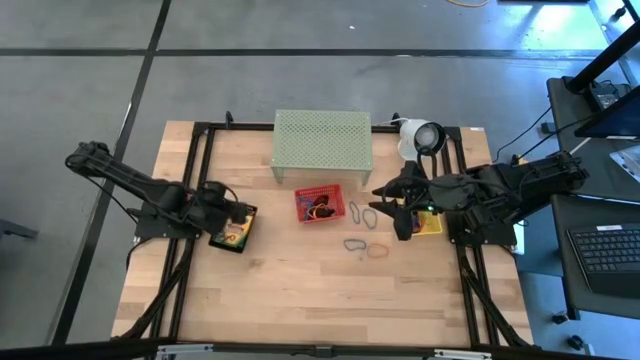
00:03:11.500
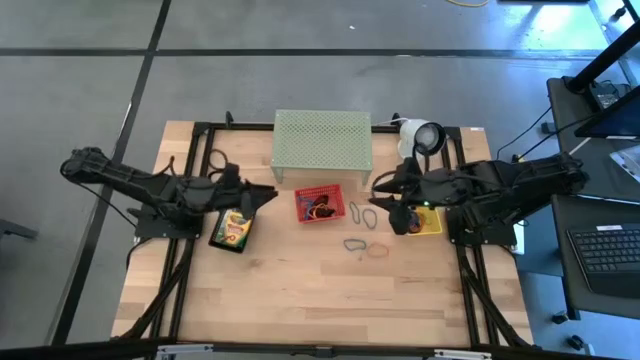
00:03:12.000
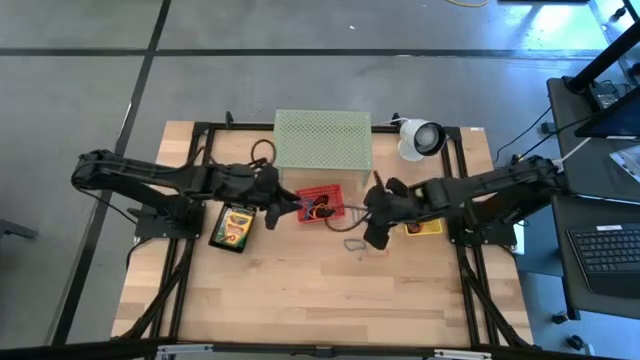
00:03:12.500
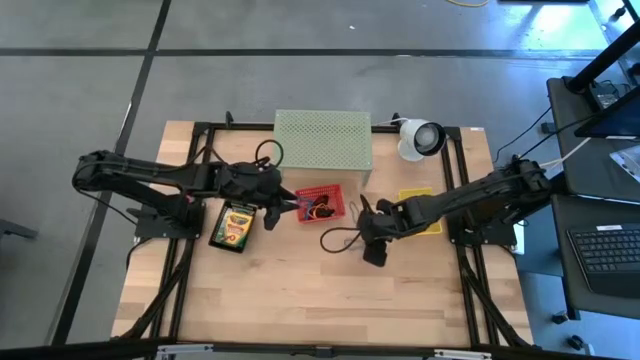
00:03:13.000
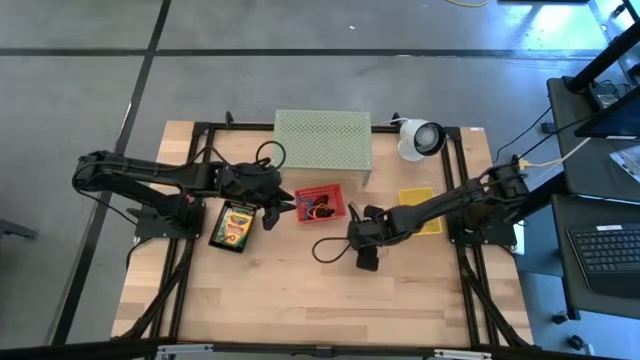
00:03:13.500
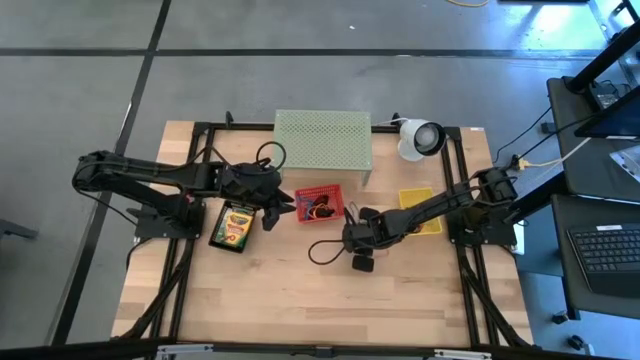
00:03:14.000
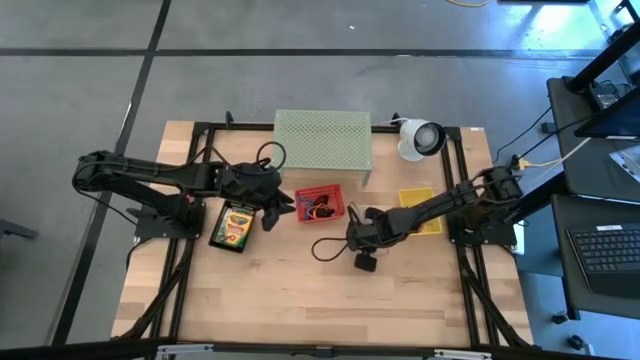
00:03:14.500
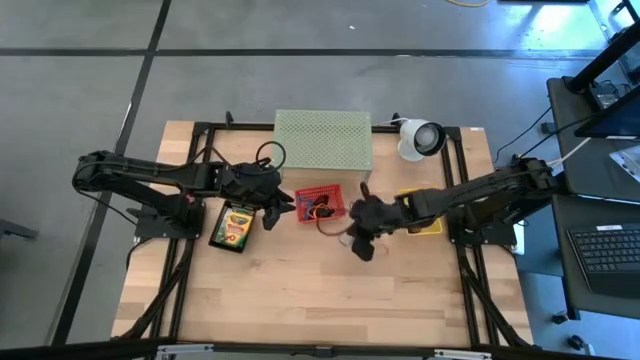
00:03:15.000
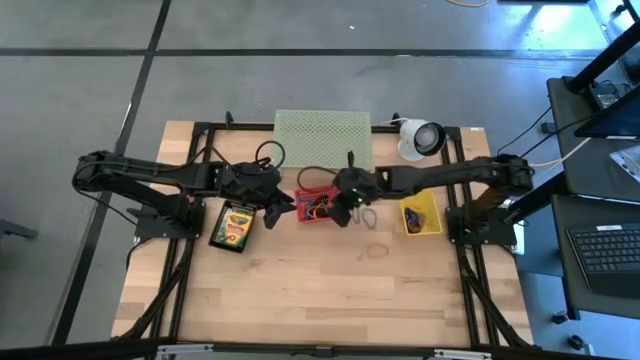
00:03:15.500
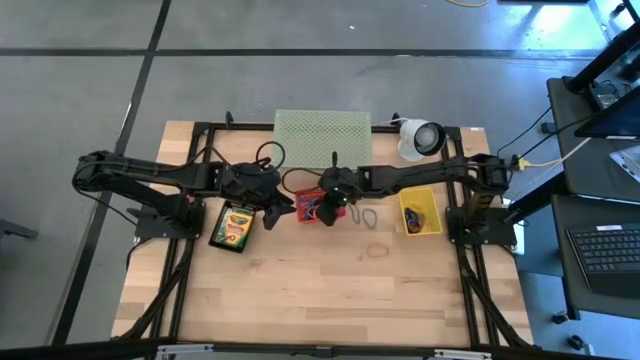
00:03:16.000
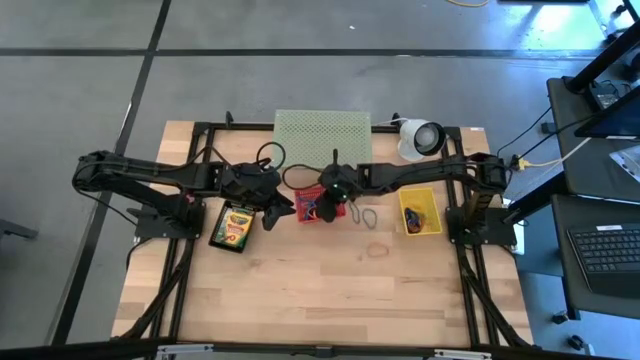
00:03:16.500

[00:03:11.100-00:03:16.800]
Task: Pick & Place Office Desk Supplies
Put the blue rubber band into the red bin

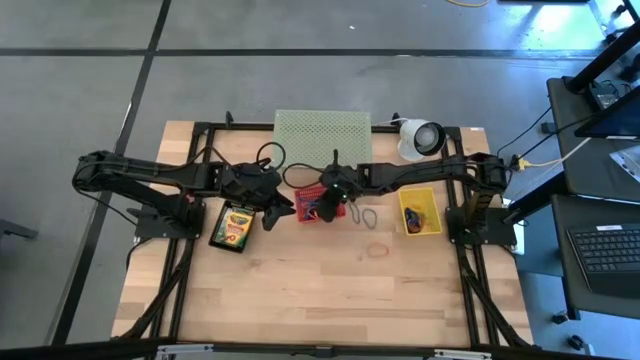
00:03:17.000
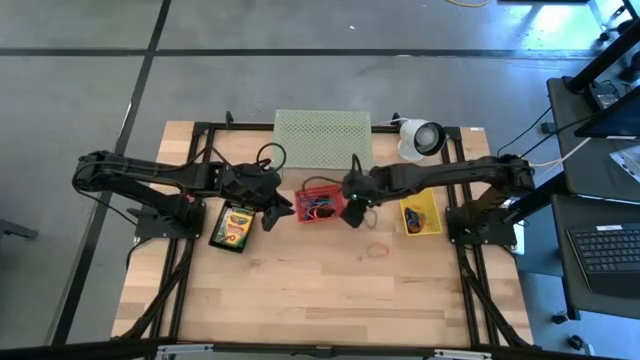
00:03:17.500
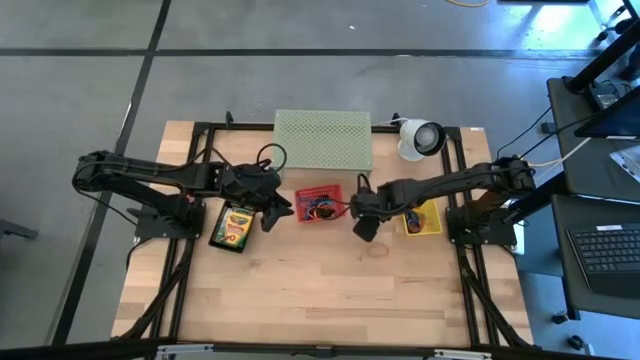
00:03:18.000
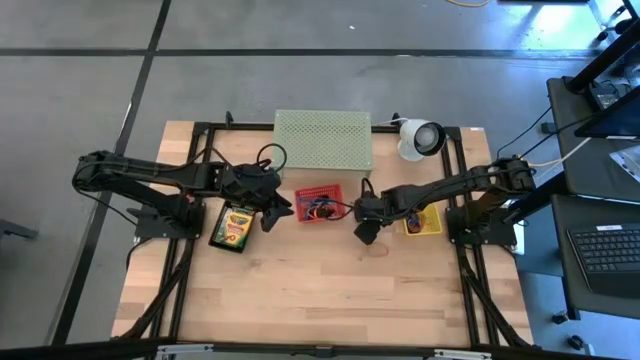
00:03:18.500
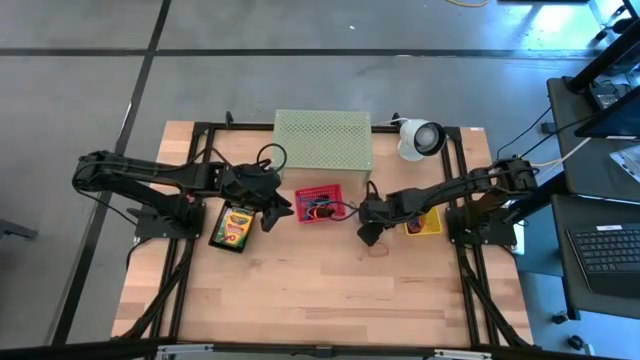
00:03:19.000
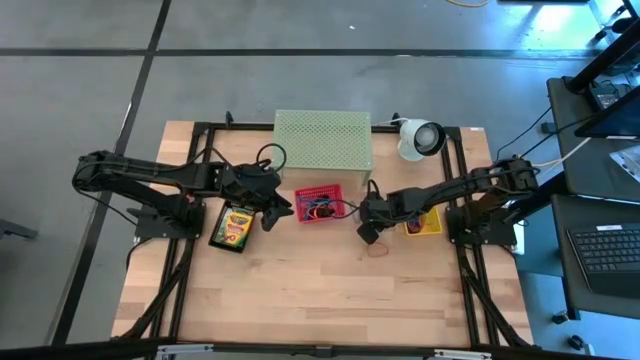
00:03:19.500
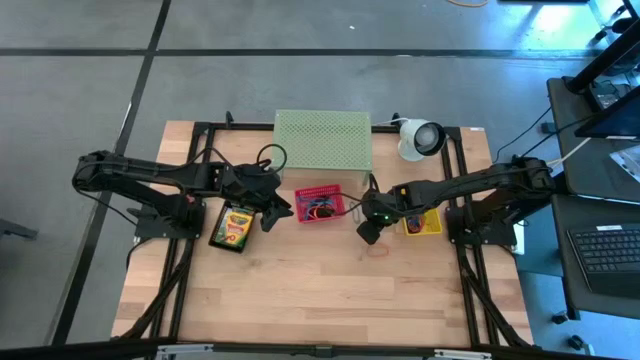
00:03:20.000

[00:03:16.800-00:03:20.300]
Put the blue rubber band into the red bin

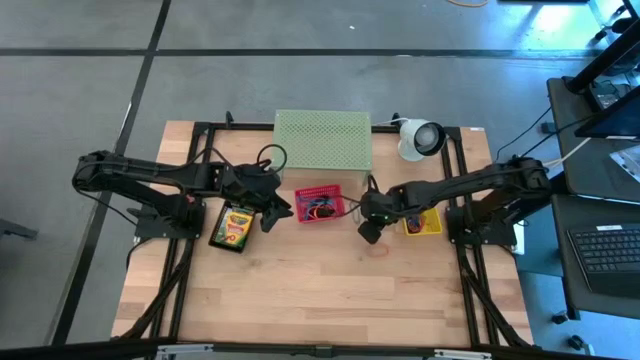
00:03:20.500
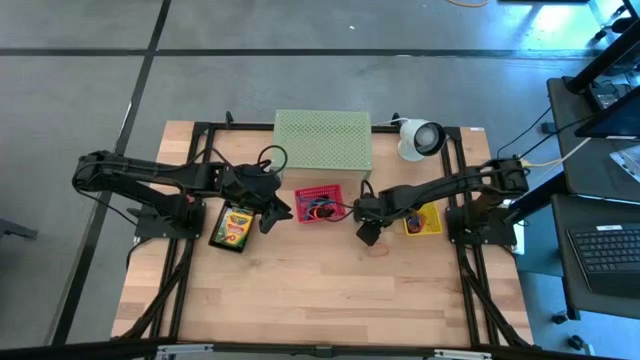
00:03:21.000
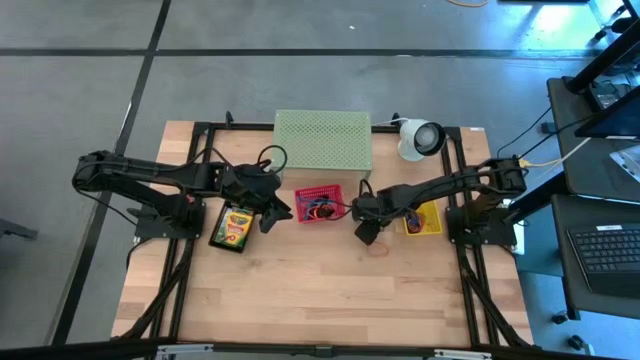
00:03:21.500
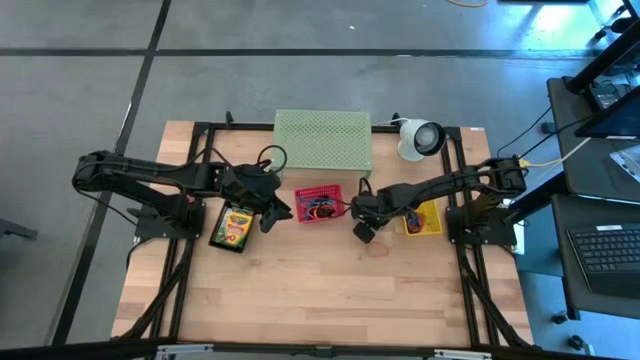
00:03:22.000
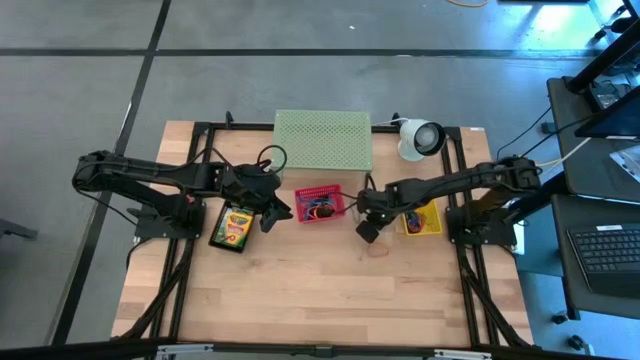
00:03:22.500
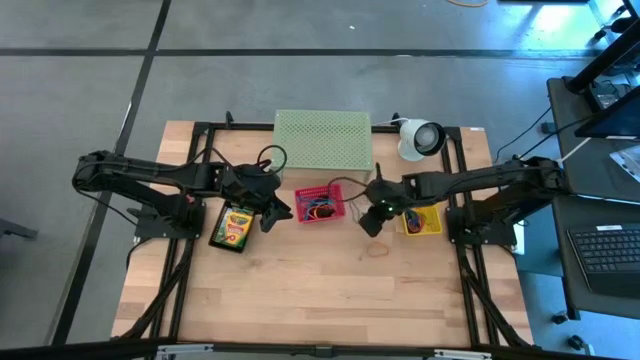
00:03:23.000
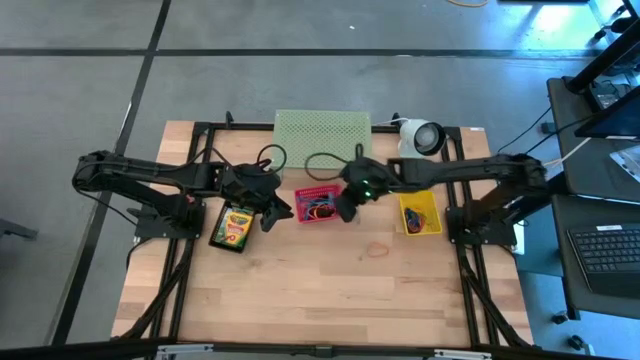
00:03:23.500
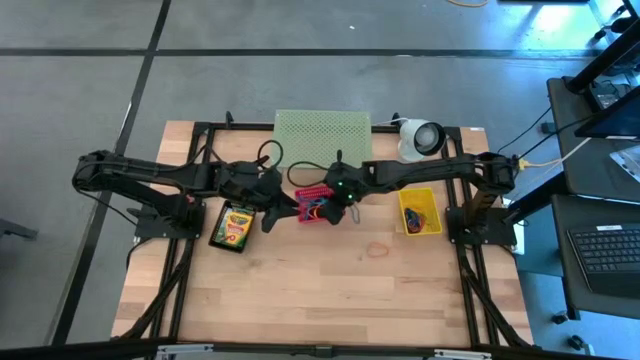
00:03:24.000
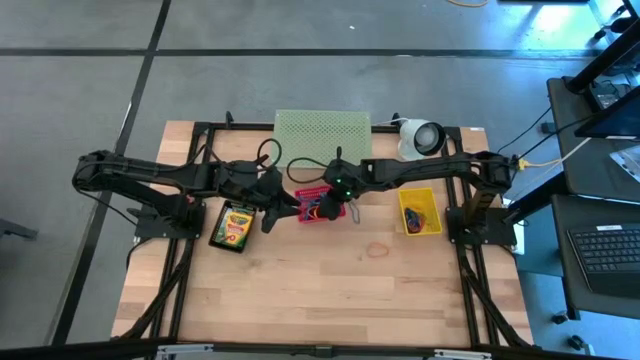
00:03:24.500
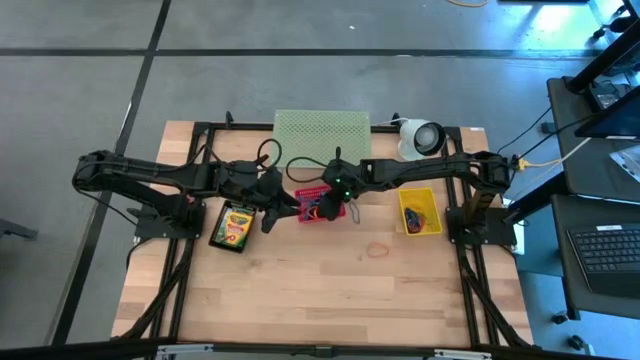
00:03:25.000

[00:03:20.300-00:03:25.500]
Put the blue rubber band into the red bin

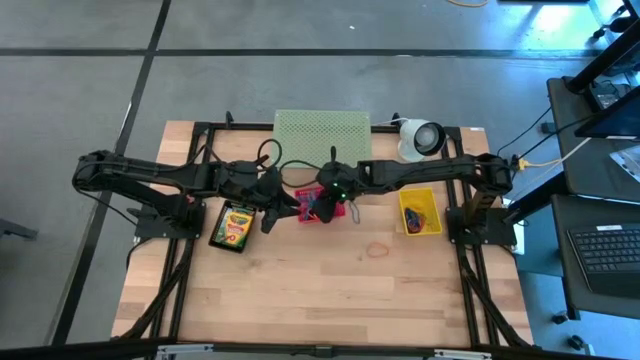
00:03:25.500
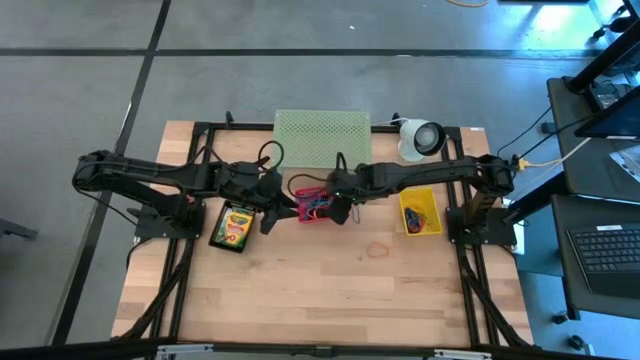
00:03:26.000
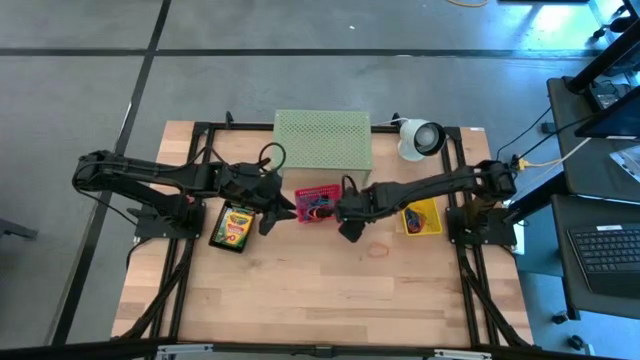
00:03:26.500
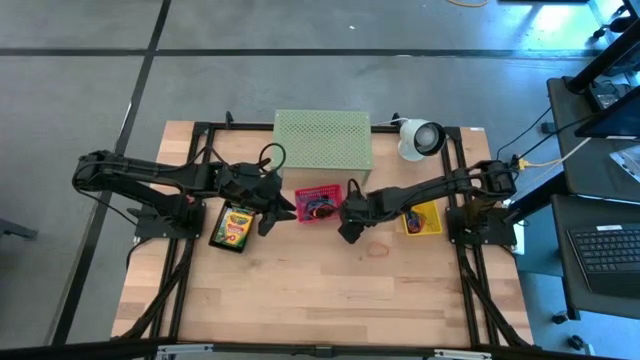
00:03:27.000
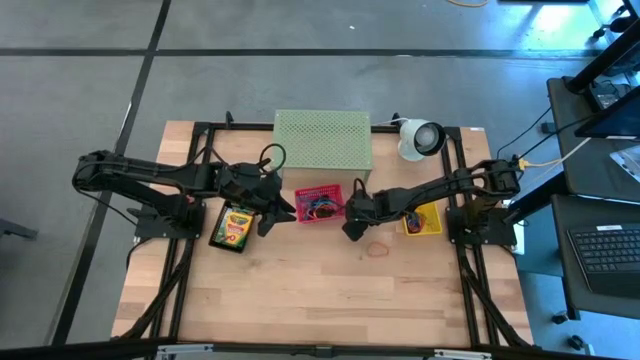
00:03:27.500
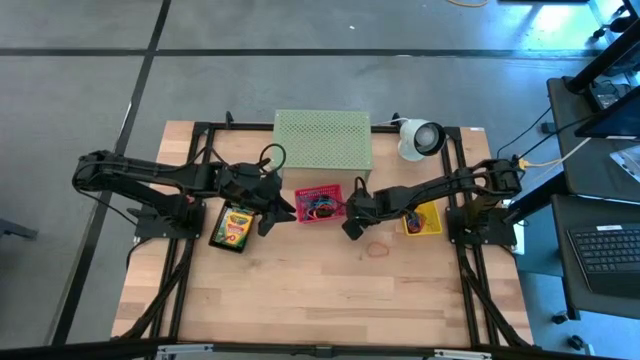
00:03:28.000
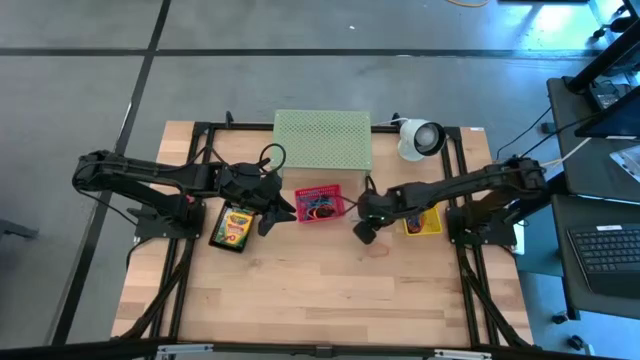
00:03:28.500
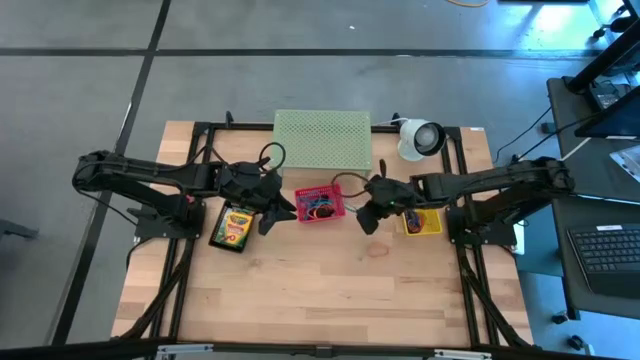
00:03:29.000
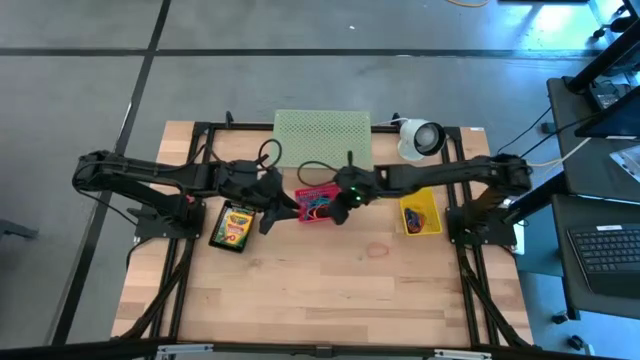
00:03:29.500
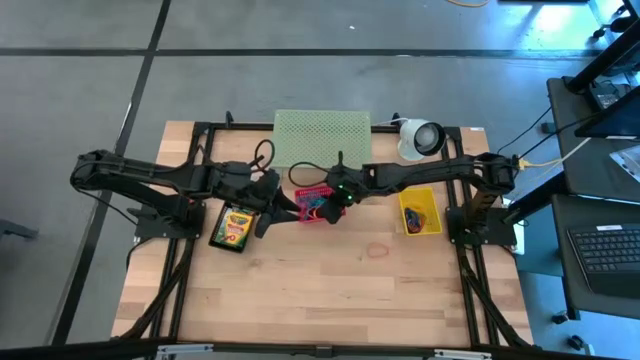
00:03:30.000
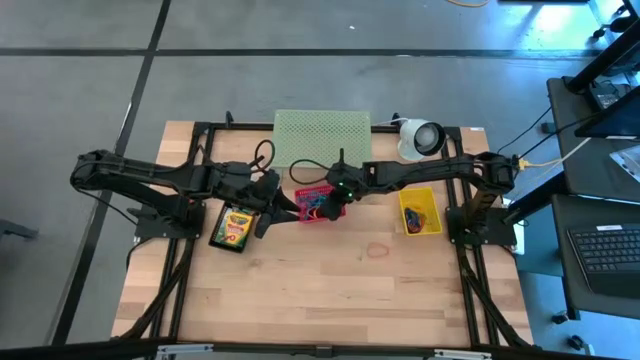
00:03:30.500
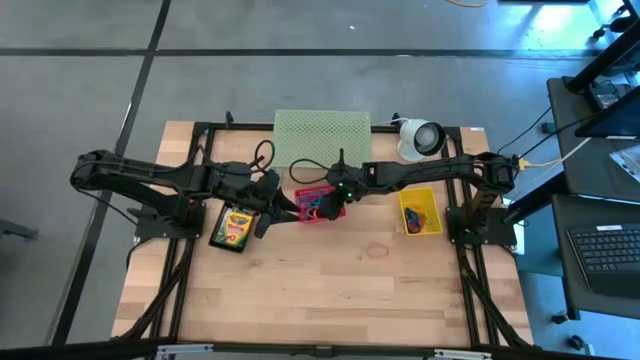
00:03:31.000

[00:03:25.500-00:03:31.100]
Put the blue rubber band into the red bin

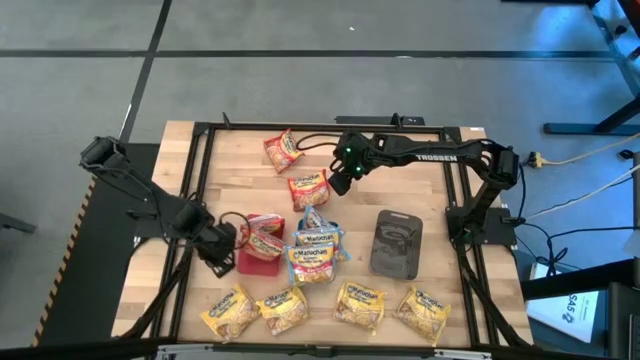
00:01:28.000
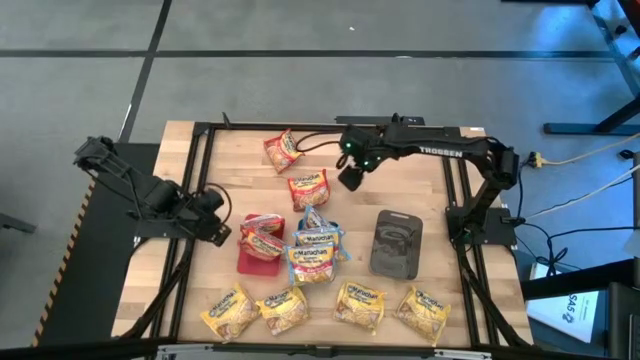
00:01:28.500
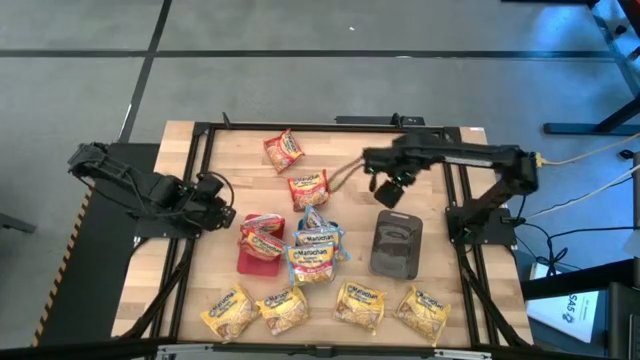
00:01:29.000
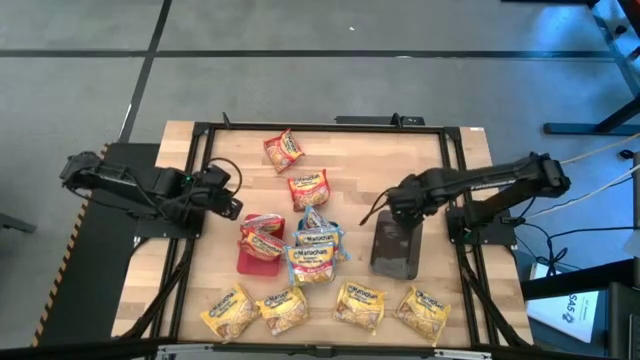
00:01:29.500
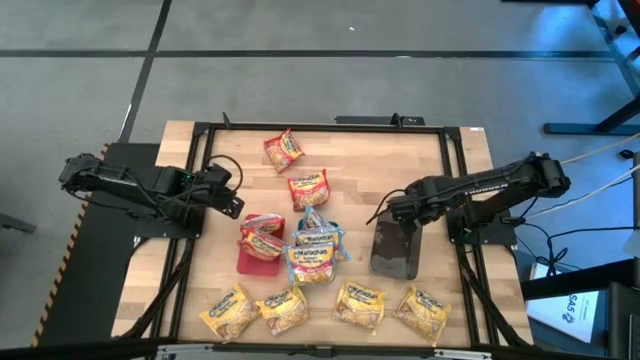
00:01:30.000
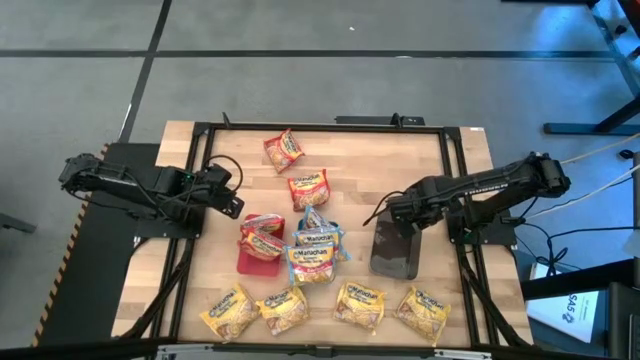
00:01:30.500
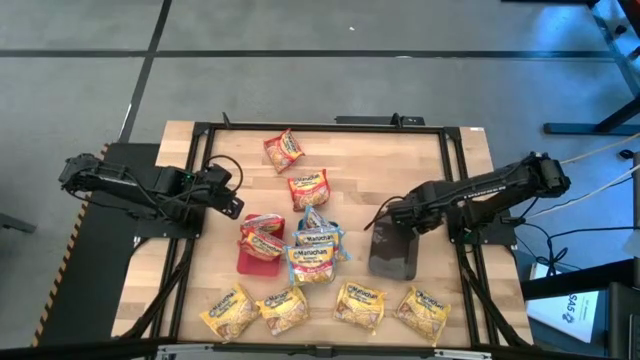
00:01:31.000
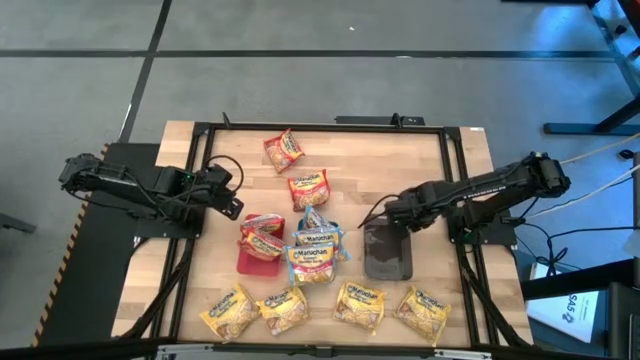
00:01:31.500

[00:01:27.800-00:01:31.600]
Task: Sort Maruchan noodles
Adjust the black bin
